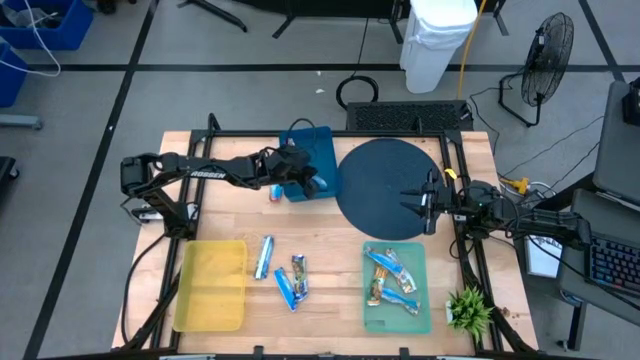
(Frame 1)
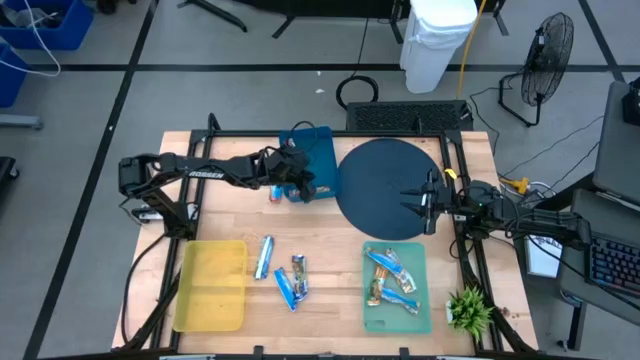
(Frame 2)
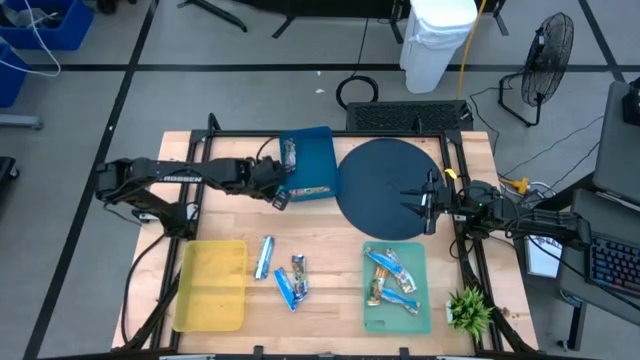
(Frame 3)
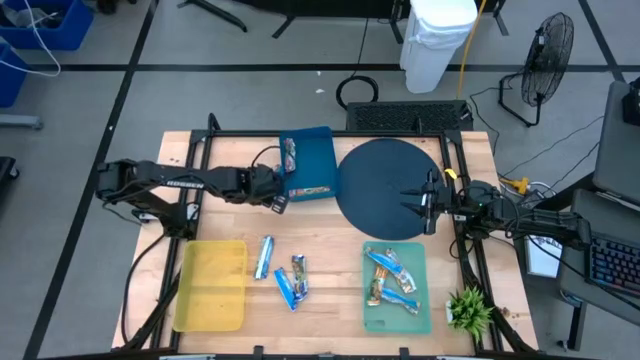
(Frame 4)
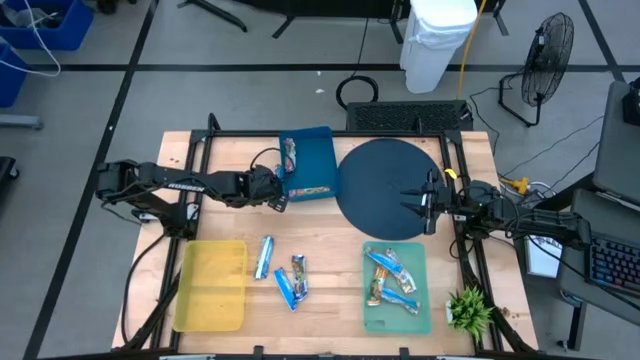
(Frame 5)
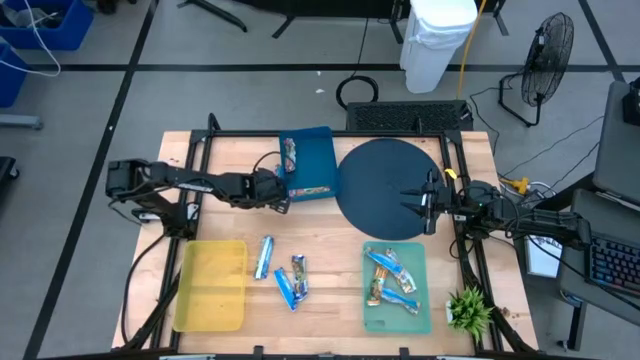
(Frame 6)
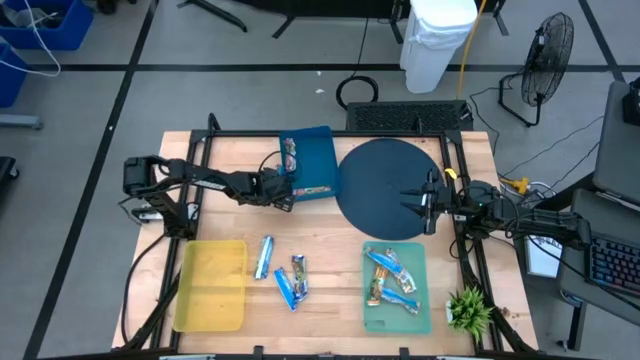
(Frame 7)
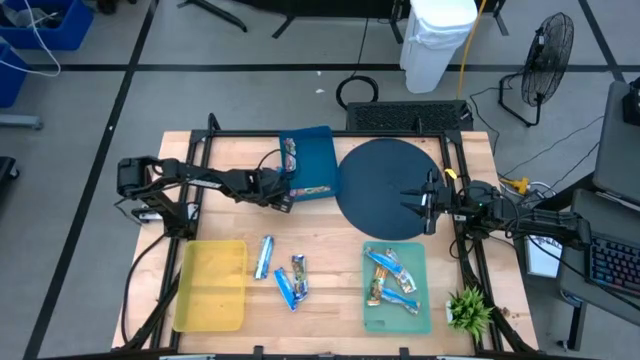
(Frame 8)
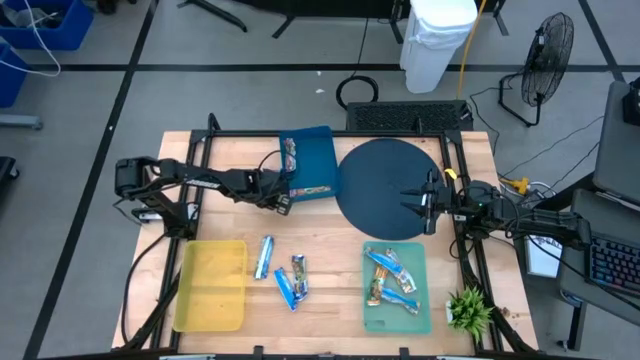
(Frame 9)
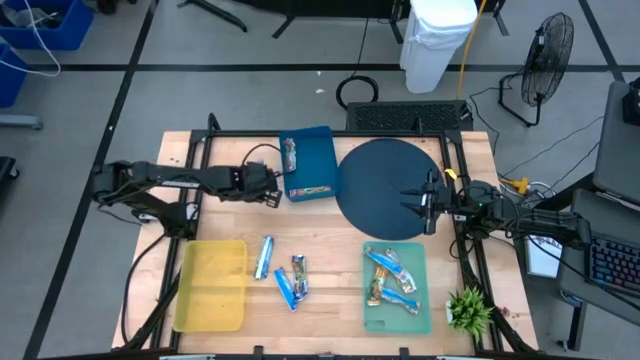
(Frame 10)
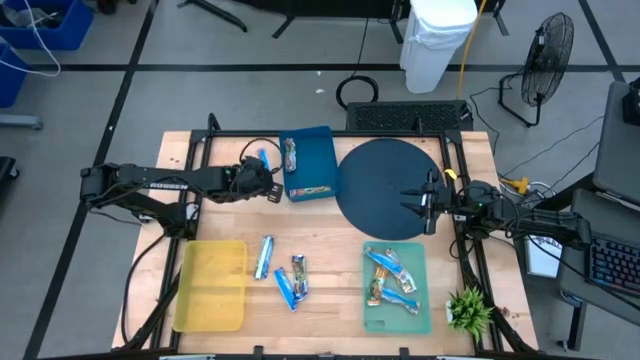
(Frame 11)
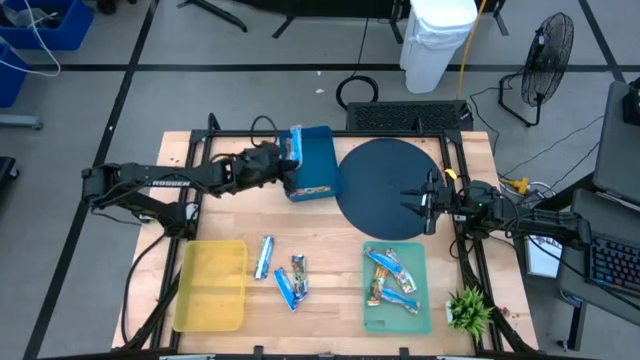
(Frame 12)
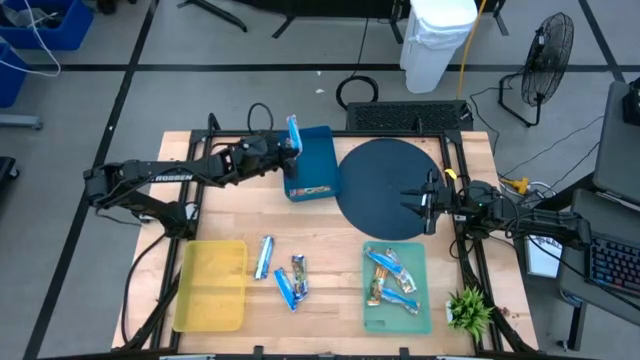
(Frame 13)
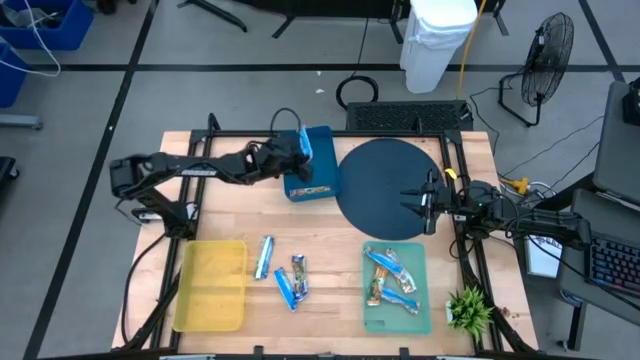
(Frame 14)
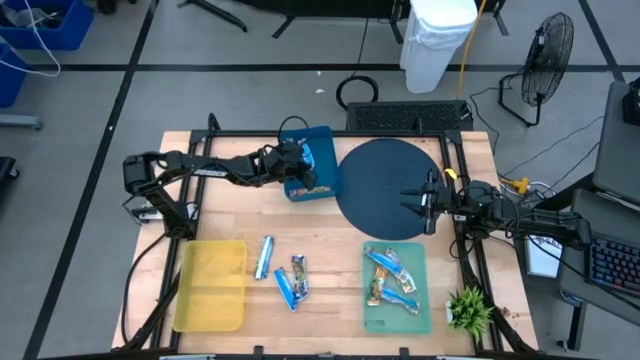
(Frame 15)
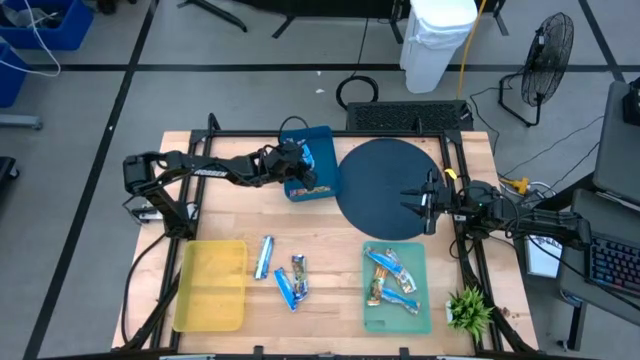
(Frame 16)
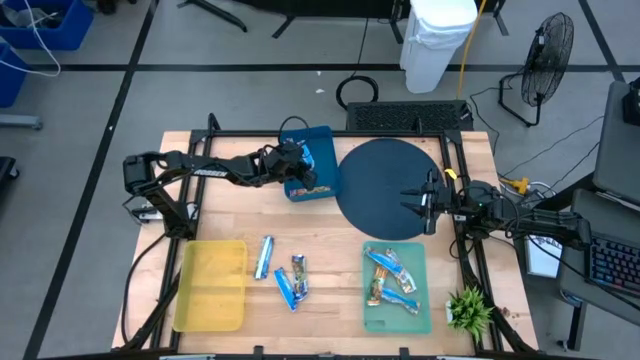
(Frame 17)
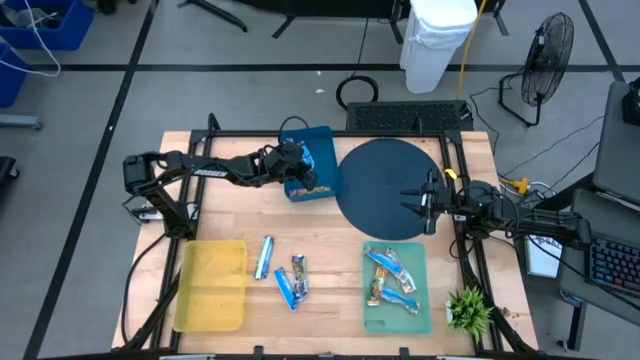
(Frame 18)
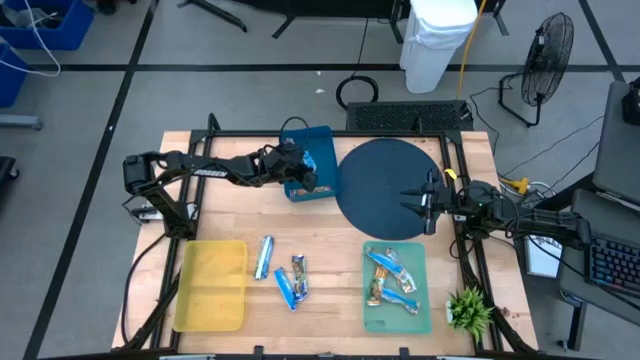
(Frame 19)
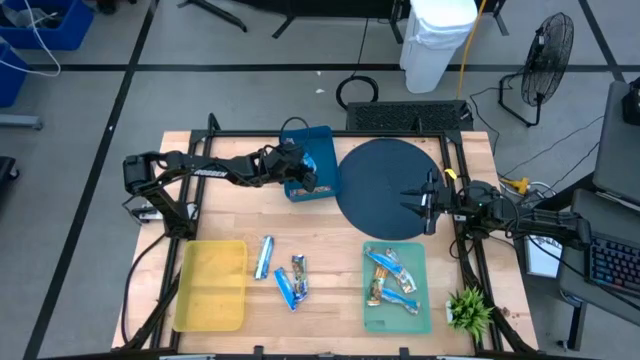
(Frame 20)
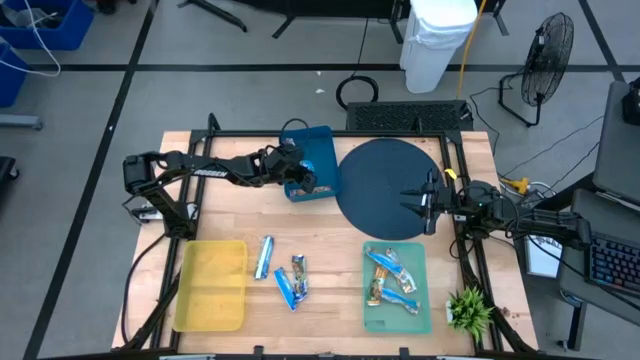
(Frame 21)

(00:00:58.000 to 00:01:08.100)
Task: Pick and place Granola Bars by type
Put the red granola bar into the blue bin

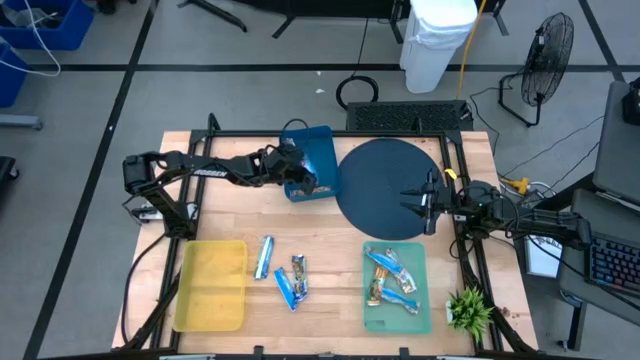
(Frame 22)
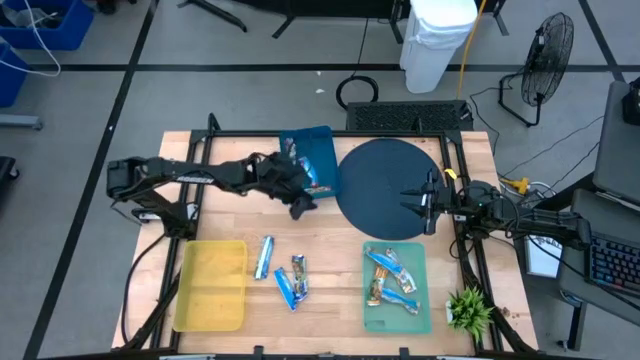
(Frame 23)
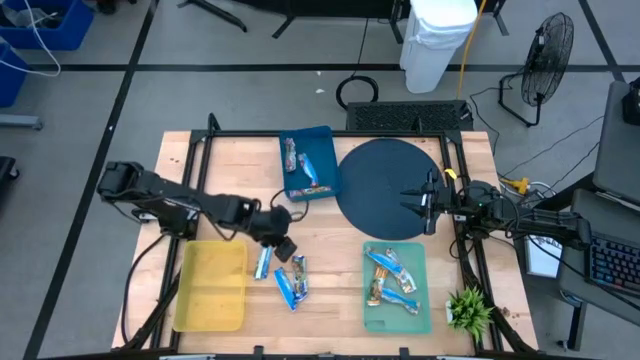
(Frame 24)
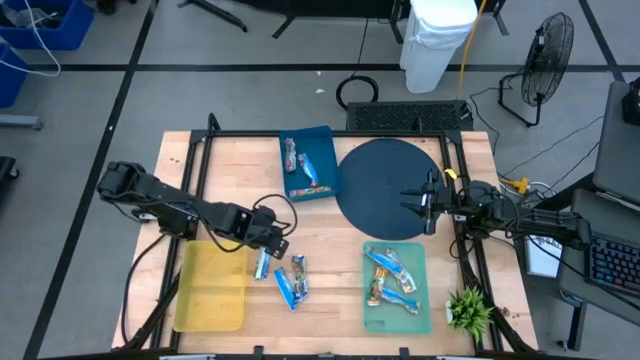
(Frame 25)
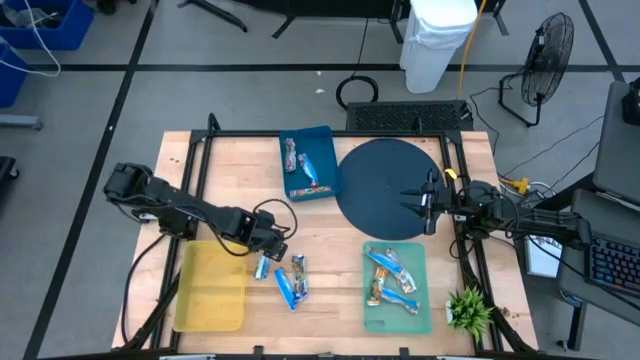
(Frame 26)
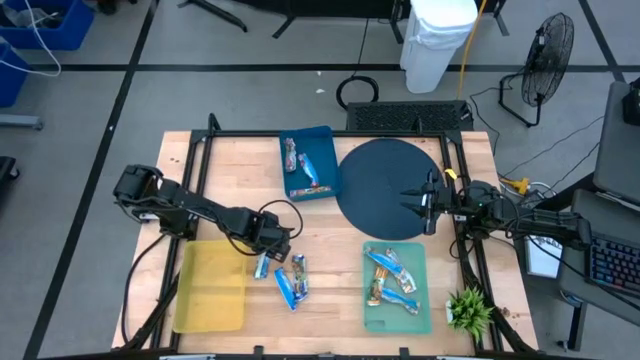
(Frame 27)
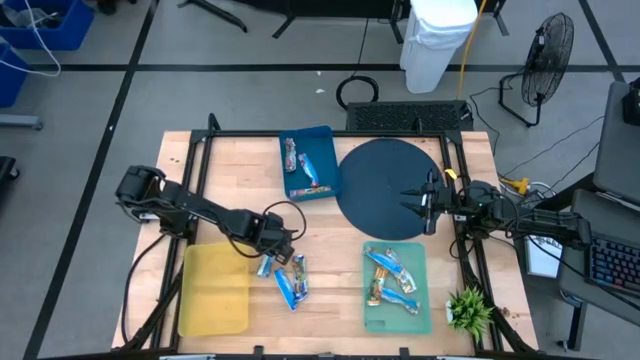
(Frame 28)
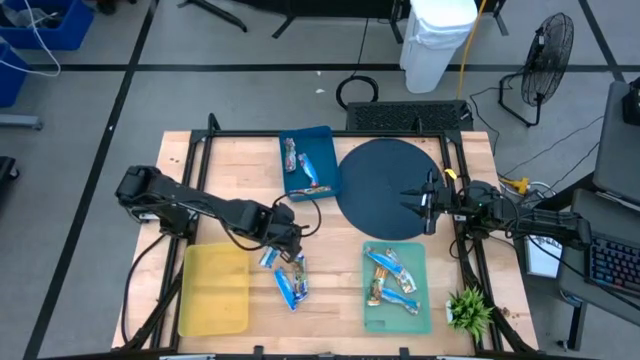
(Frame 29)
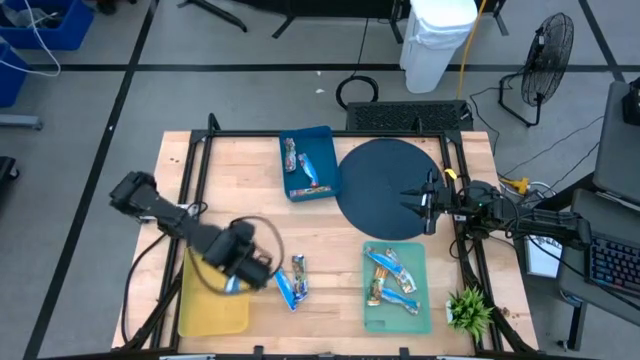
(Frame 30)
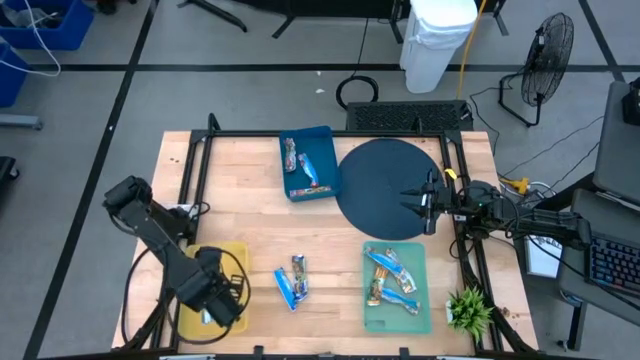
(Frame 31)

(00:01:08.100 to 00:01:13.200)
Put the blue granola bar into the yellow bin

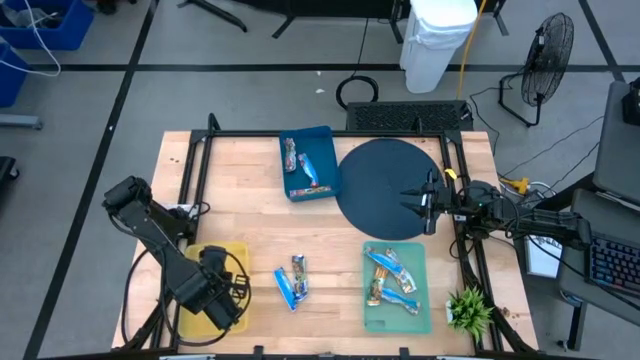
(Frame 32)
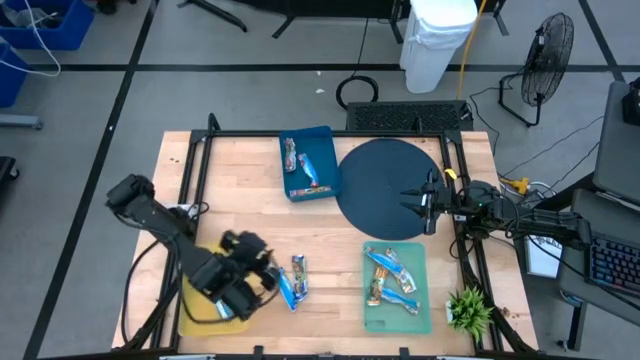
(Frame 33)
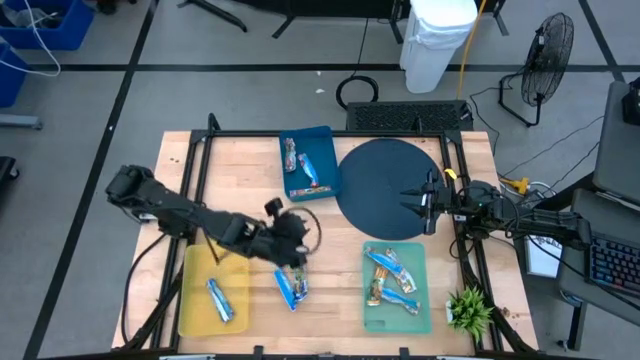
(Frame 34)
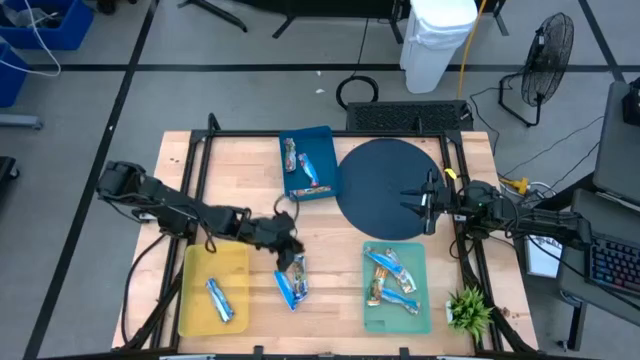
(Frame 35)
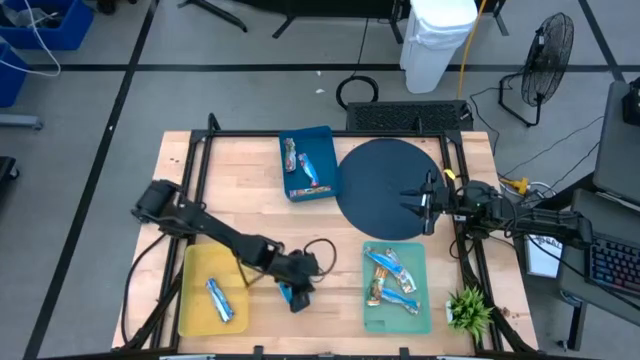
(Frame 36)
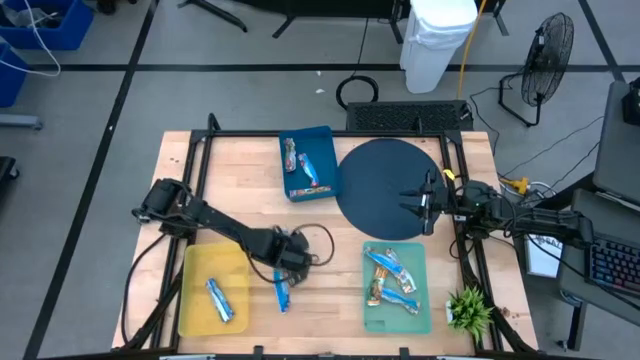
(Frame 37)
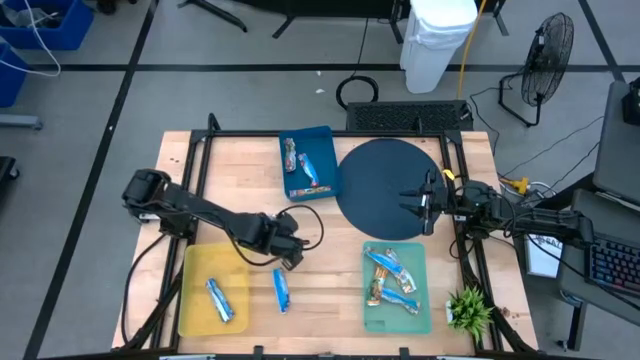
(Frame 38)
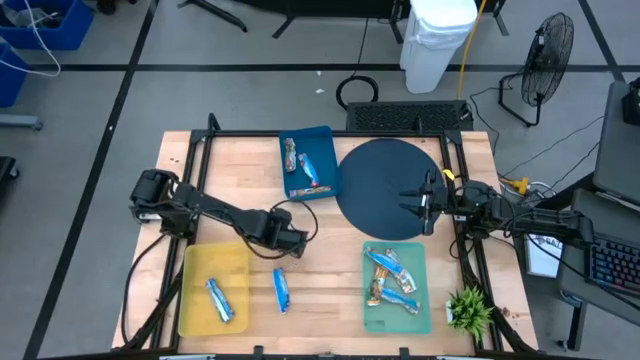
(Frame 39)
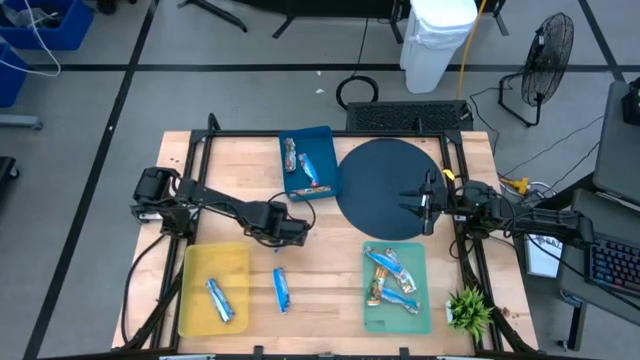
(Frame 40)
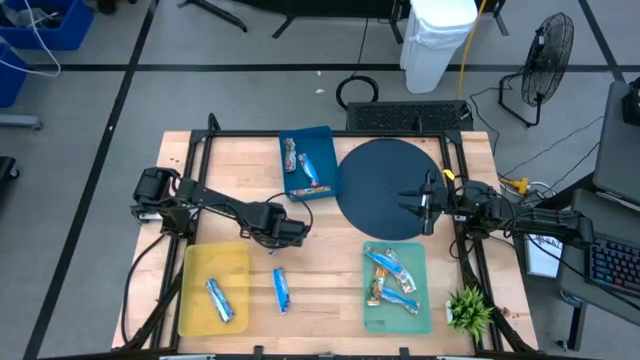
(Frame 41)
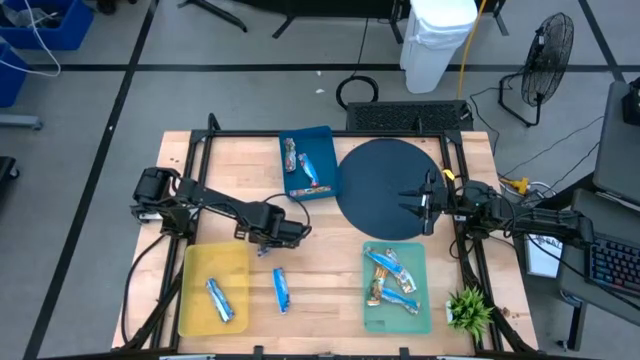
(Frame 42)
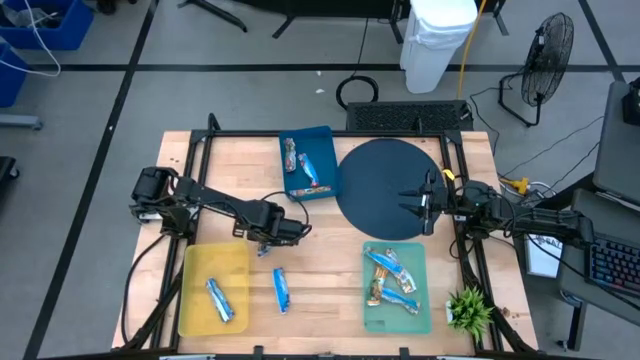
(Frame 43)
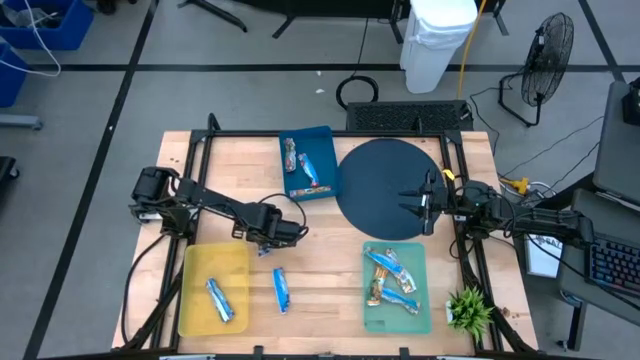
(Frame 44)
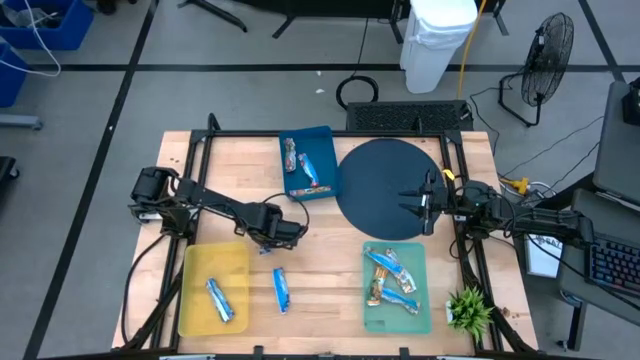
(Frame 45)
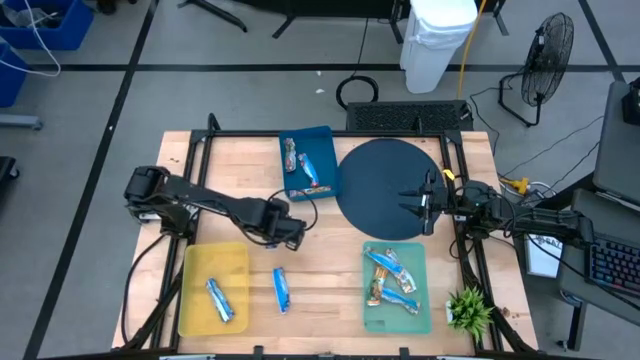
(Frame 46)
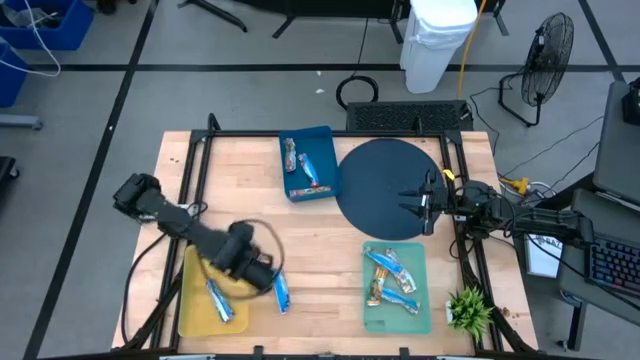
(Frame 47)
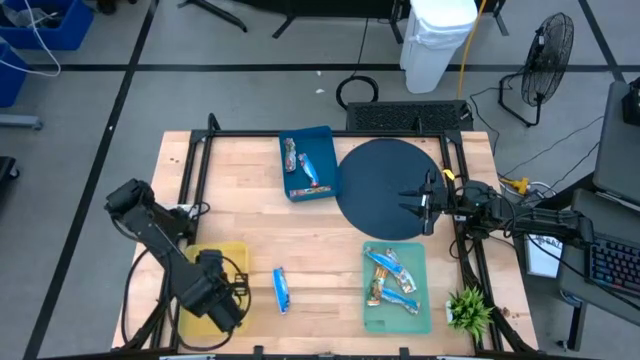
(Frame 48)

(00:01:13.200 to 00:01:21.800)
Put the blue granola bar into the yellow bin
